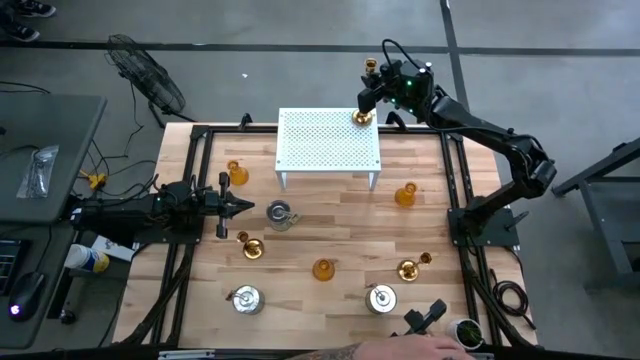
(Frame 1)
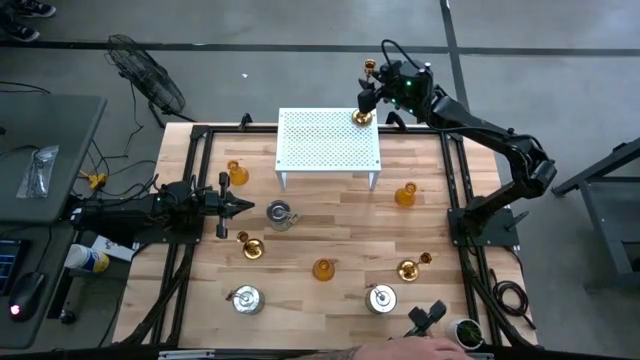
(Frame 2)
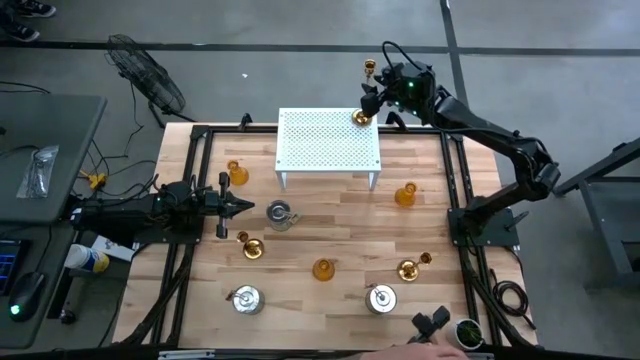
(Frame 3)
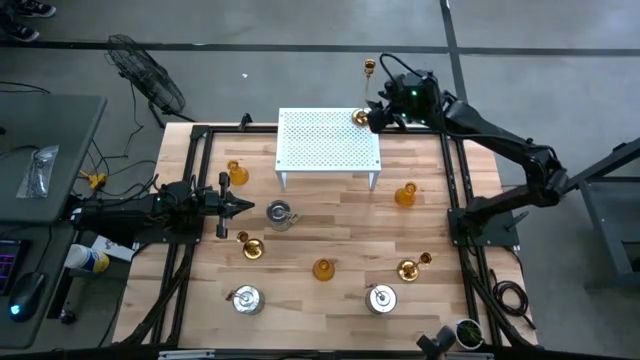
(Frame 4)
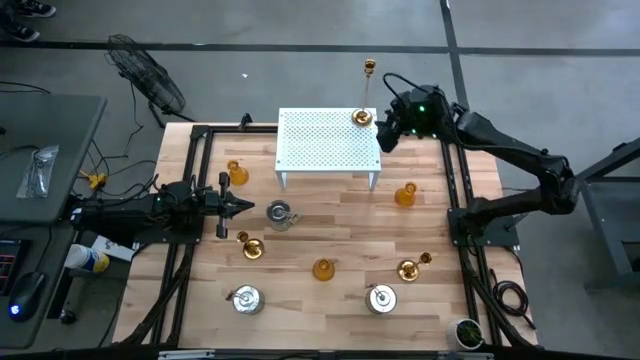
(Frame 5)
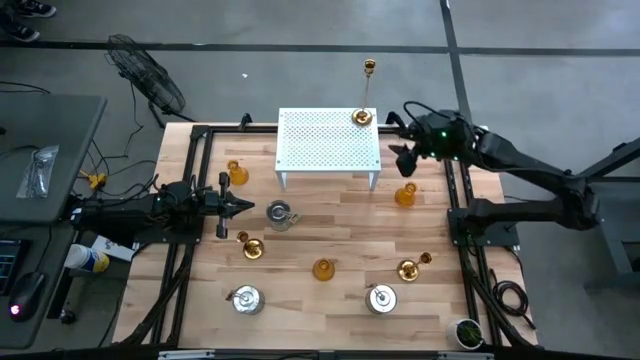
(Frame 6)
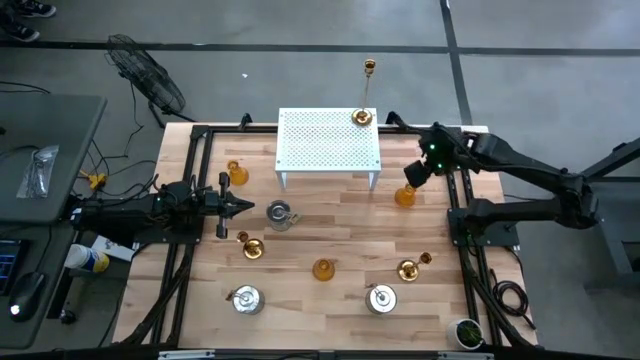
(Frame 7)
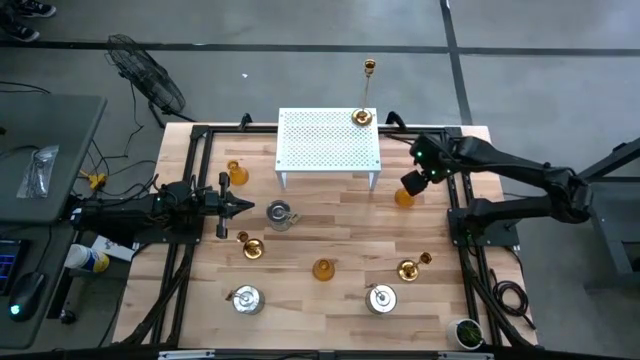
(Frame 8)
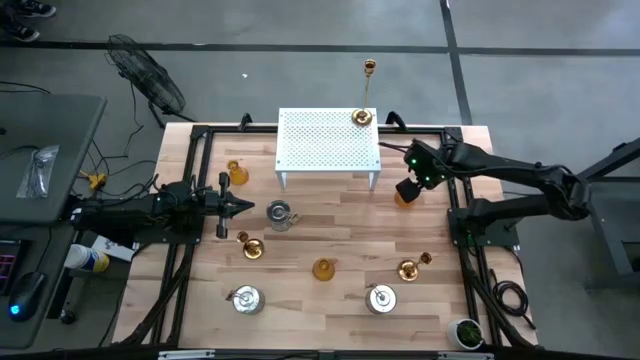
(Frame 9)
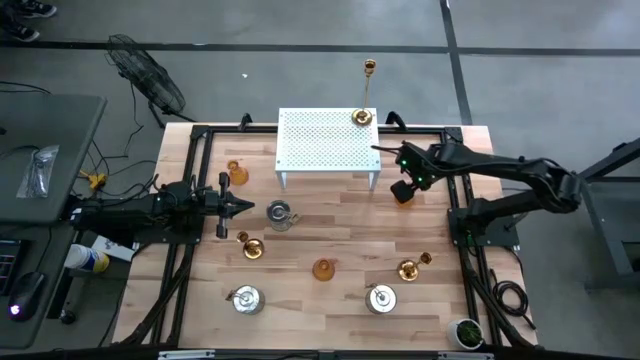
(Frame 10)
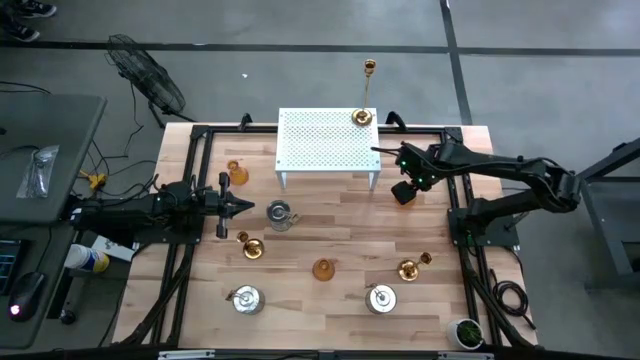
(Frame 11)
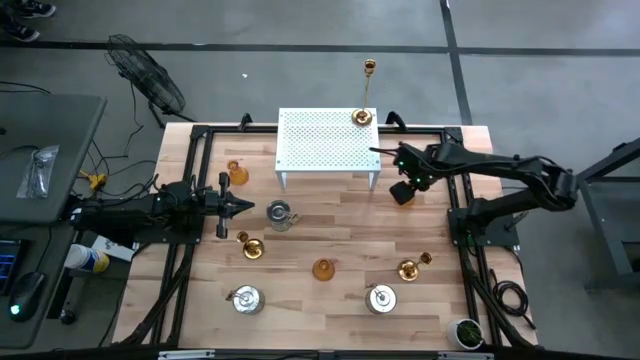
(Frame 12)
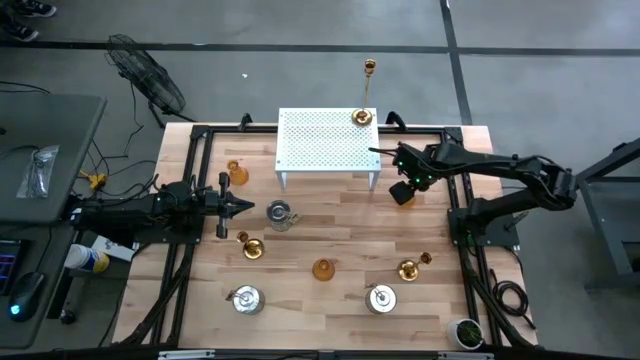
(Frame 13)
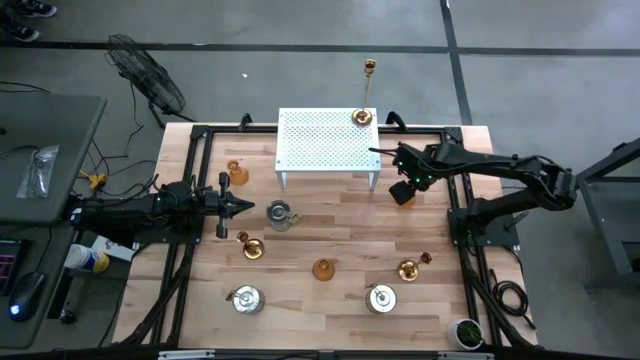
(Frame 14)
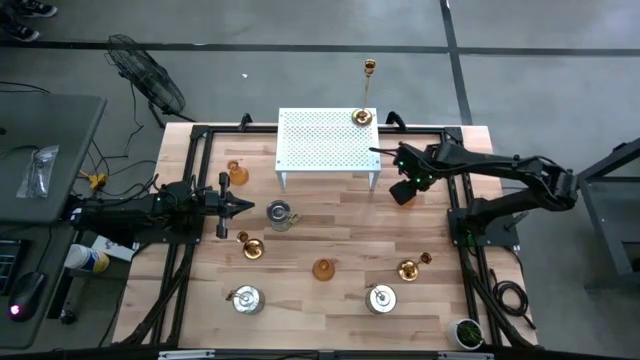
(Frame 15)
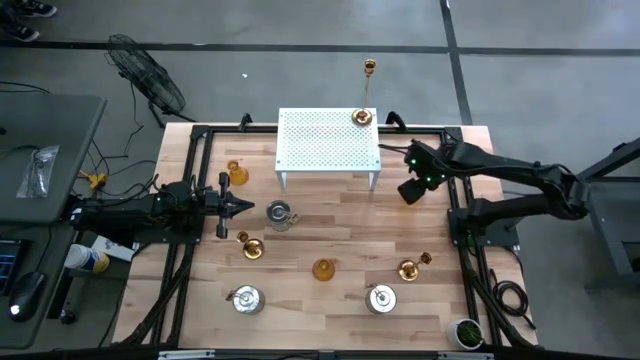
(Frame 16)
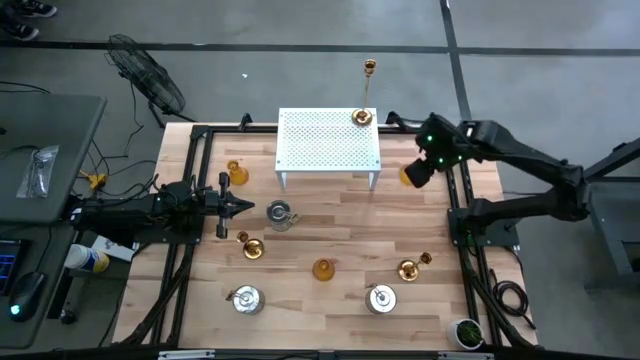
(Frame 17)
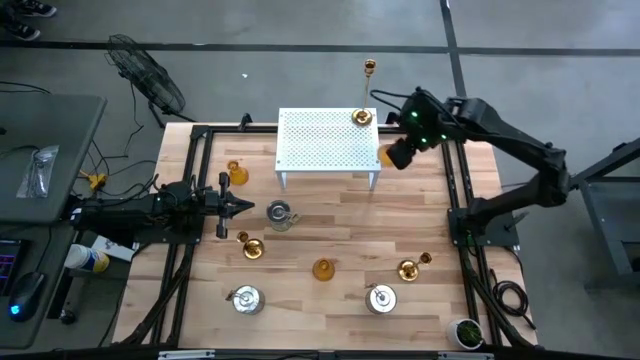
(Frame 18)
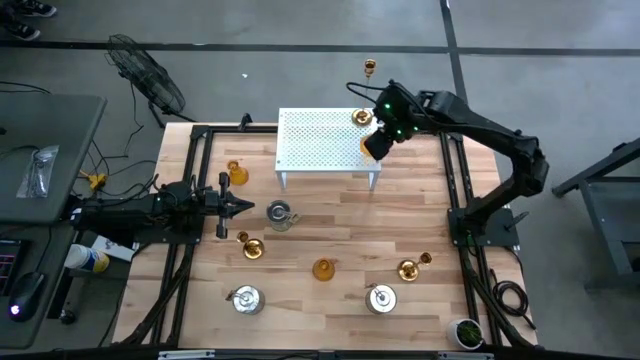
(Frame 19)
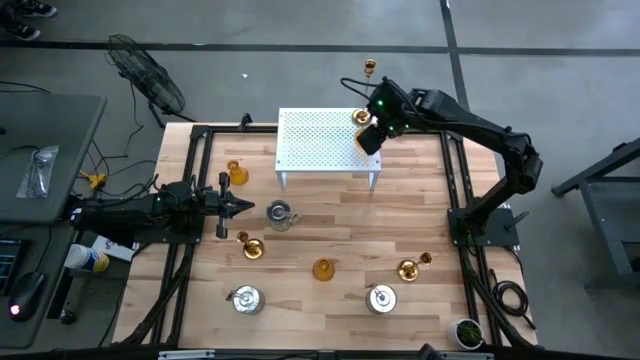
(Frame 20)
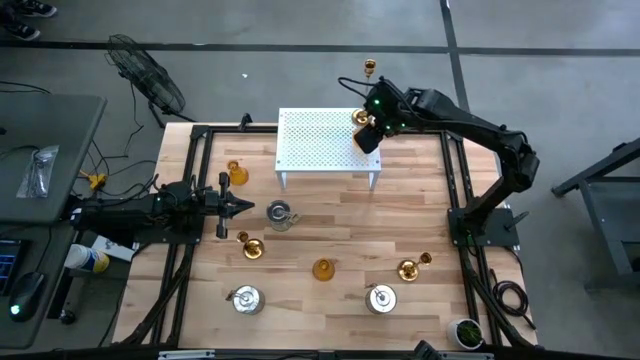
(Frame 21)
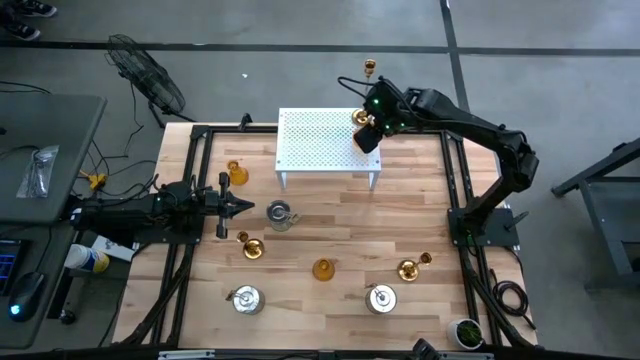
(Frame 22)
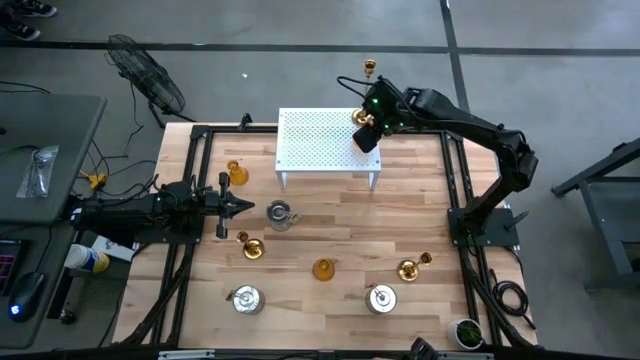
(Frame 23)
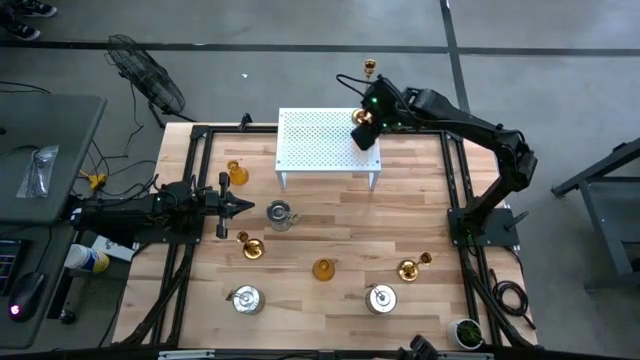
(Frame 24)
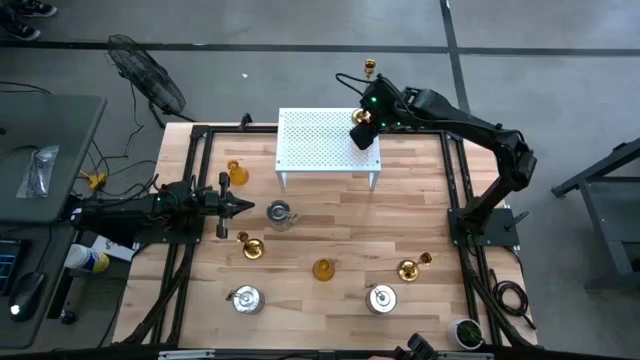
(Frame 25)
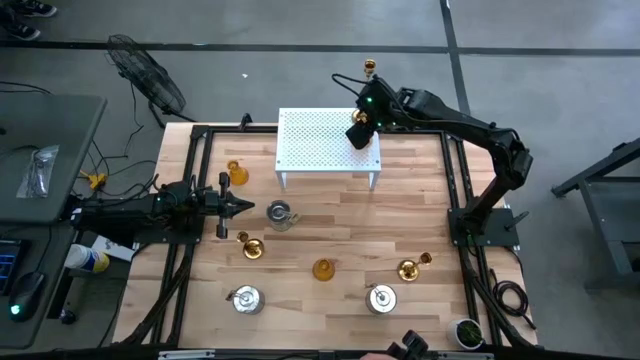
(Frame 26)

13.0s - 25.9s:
Task: Pick & Place candle stick holders
Put the right brown glass candle holder on the shelf

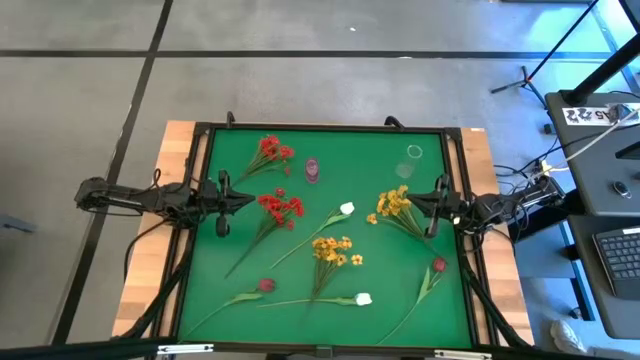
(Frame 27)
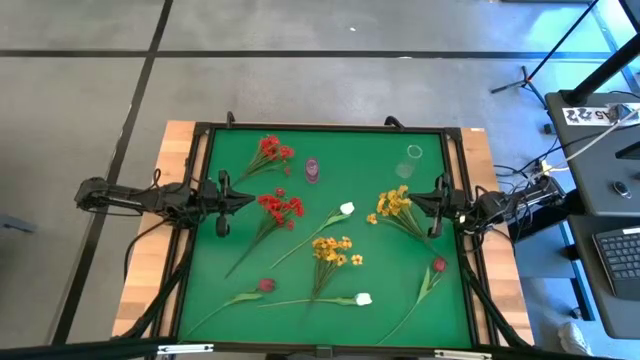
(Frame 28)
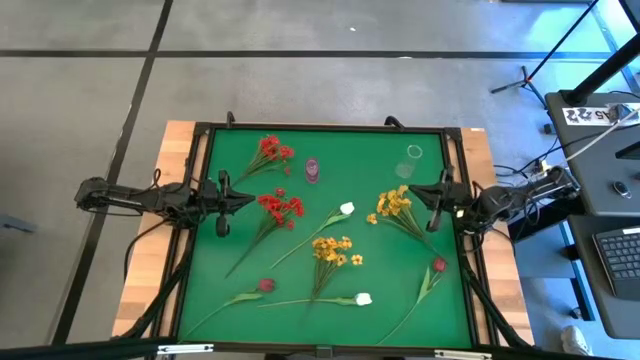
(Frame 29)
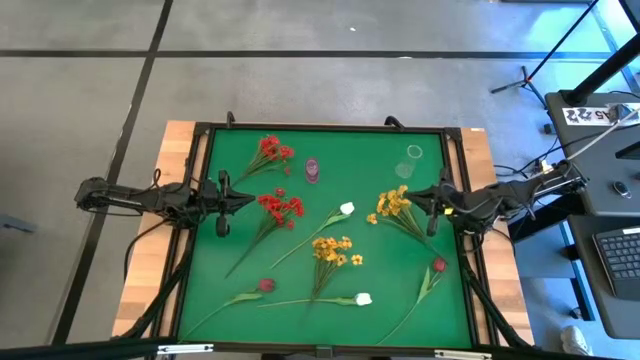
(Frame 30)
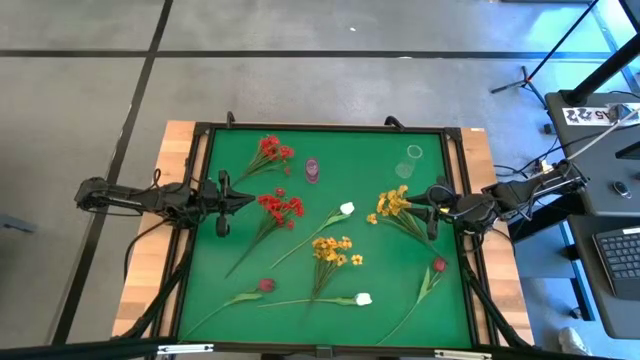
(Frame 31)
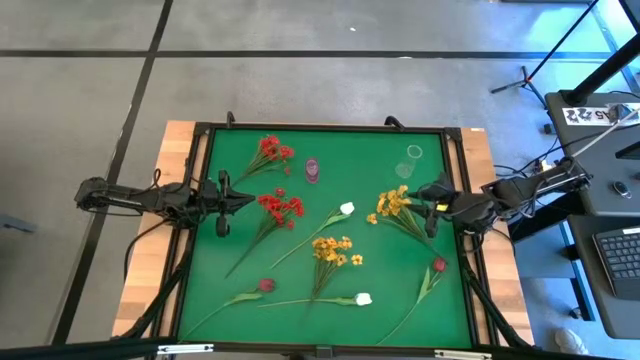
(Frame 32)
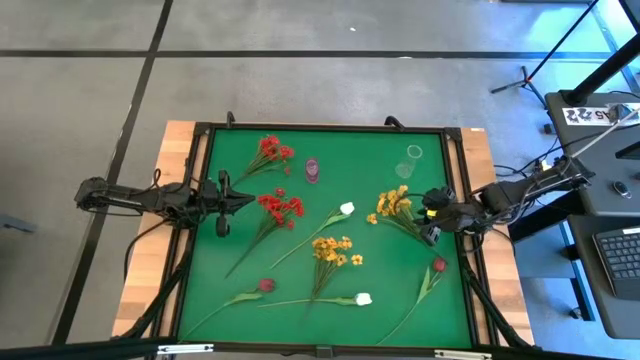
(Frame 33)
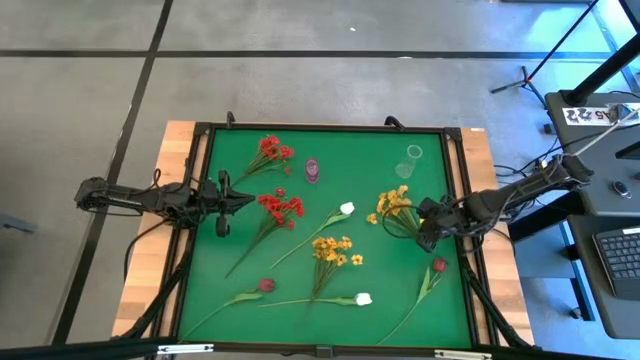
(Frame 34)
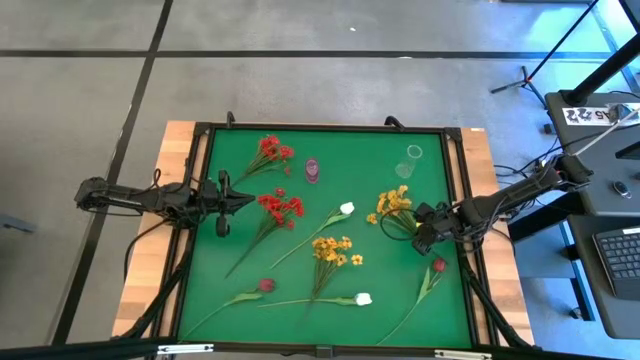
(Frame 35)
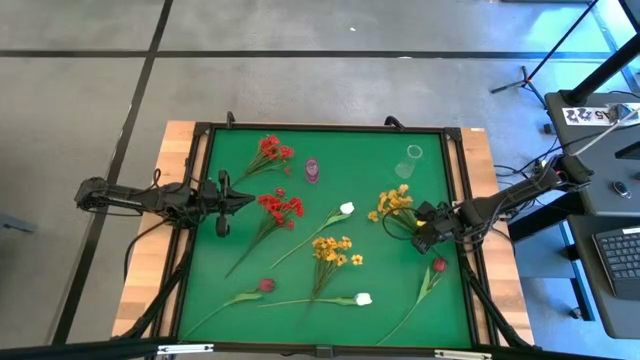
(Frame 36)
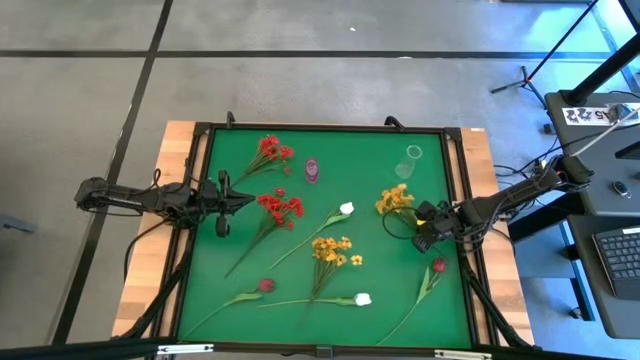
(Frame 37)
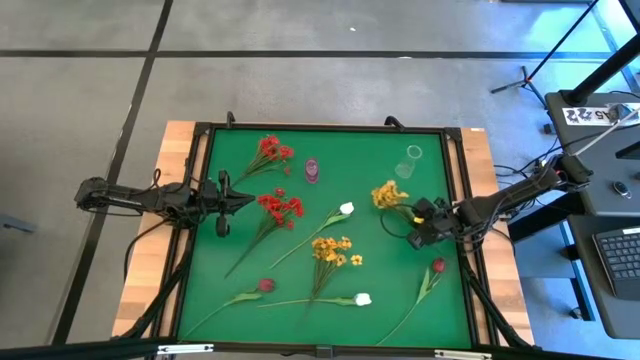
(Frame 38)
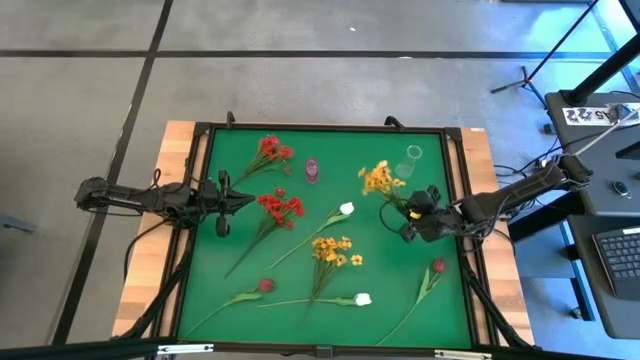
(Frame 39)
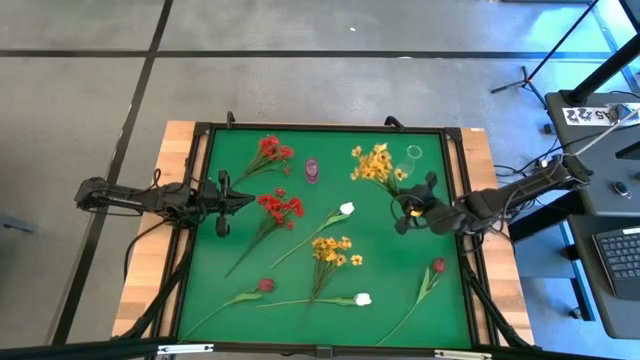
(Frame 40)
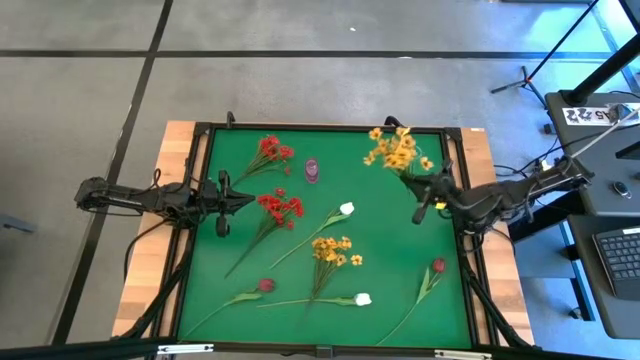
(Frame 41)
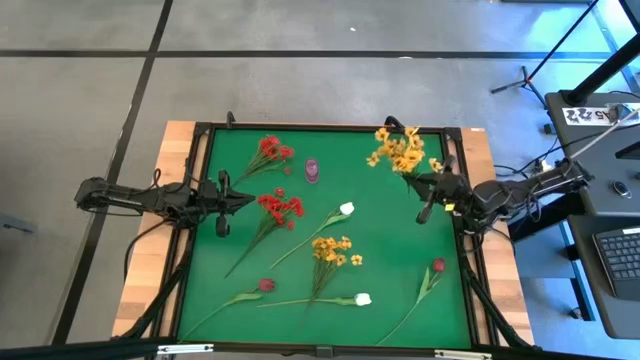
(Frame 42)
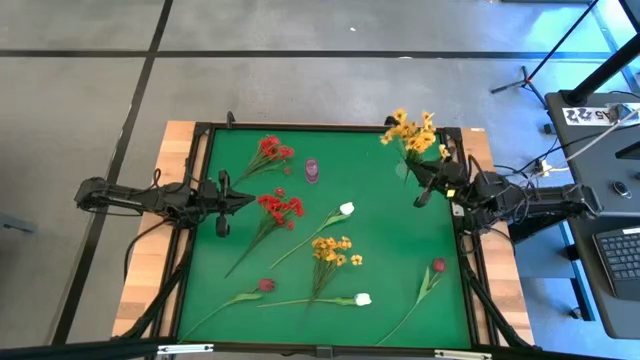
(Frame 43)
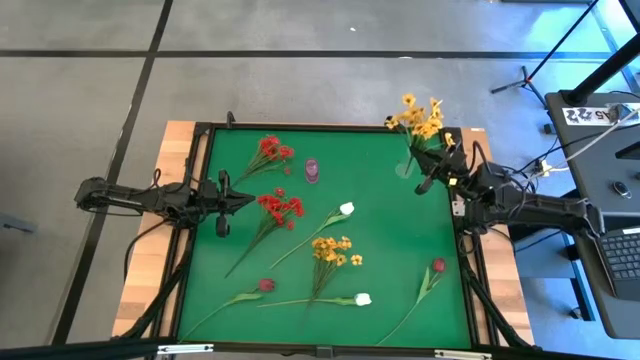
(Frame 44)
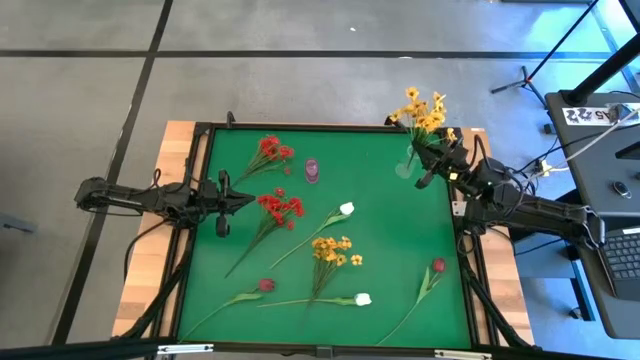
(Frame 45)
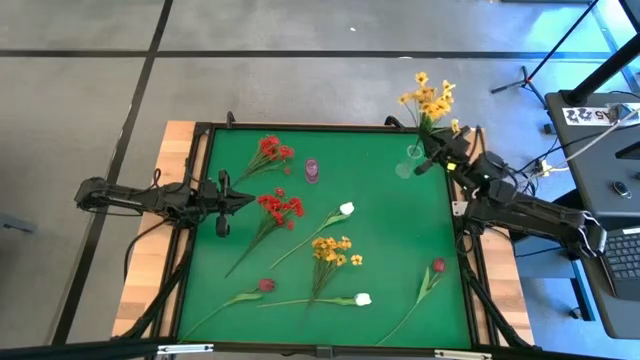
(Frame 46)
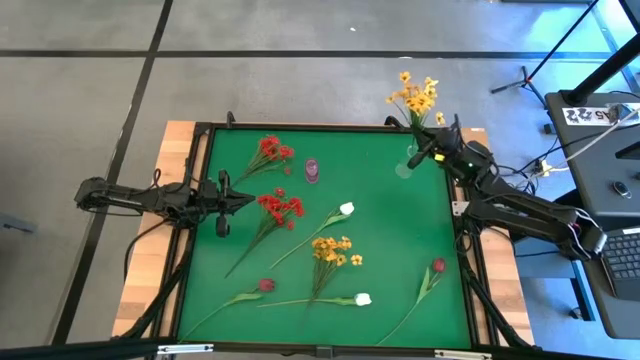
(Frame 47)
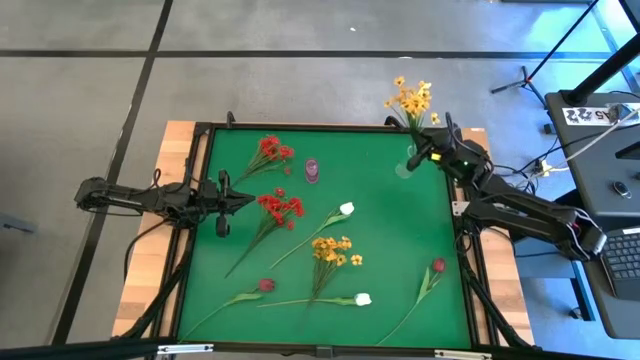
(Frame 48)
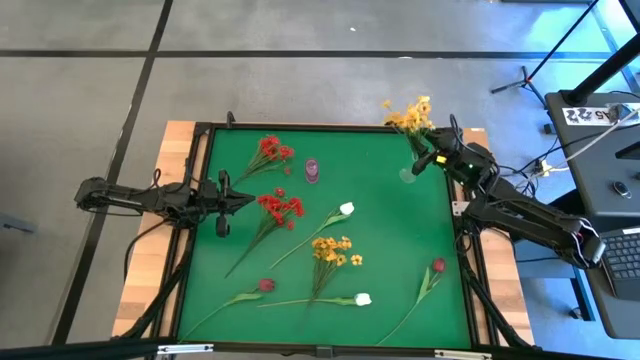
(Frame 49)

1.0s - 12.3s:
Task: Sort flowers into vase by color
Put the top yellow flowers into the transparent vase
